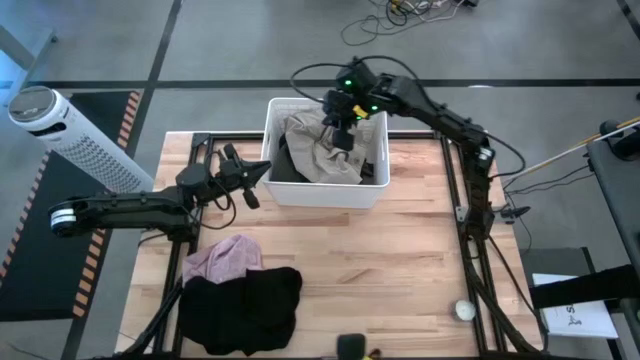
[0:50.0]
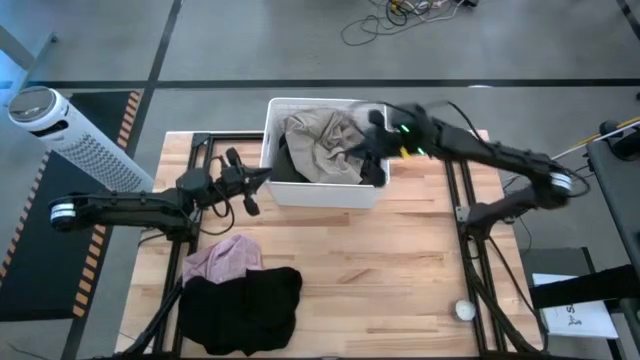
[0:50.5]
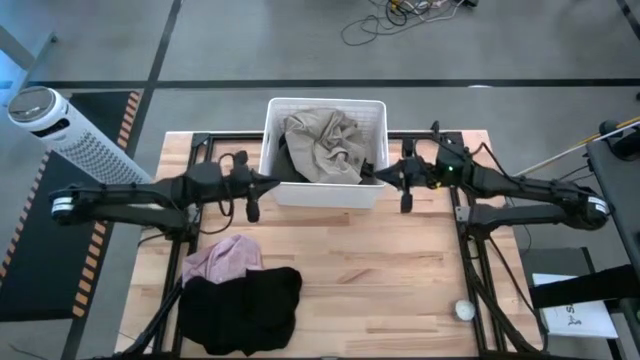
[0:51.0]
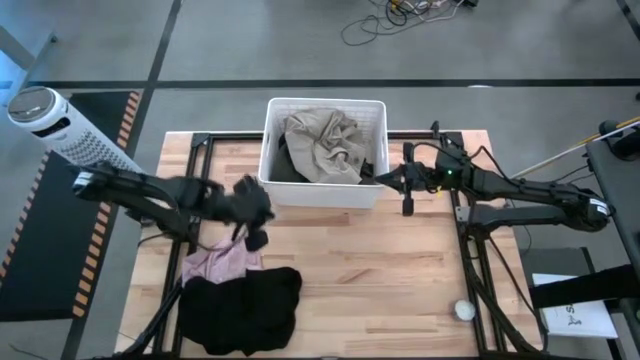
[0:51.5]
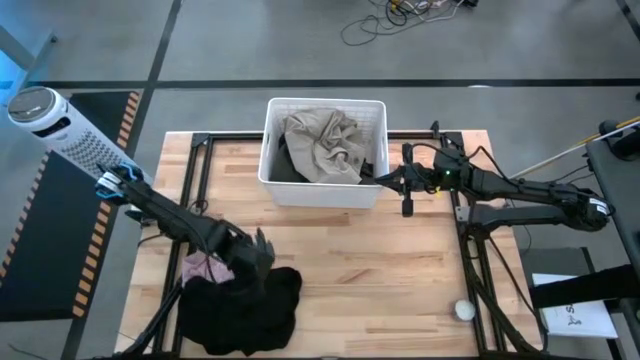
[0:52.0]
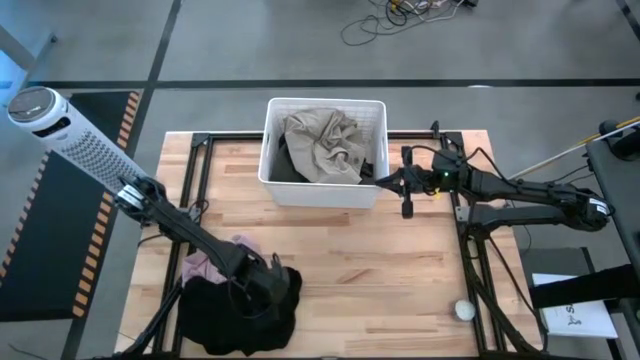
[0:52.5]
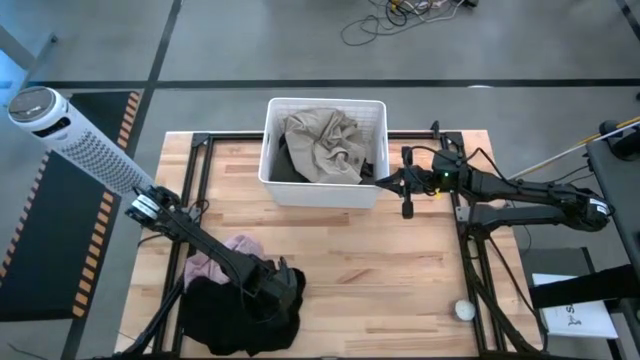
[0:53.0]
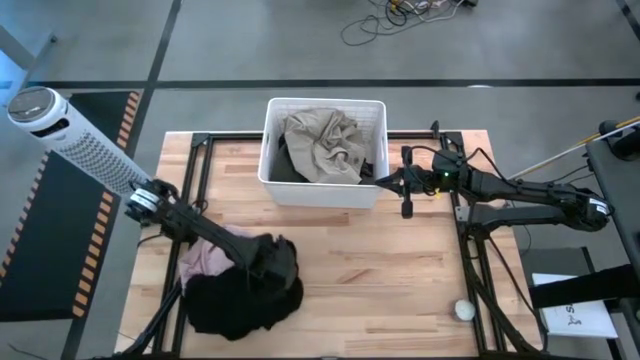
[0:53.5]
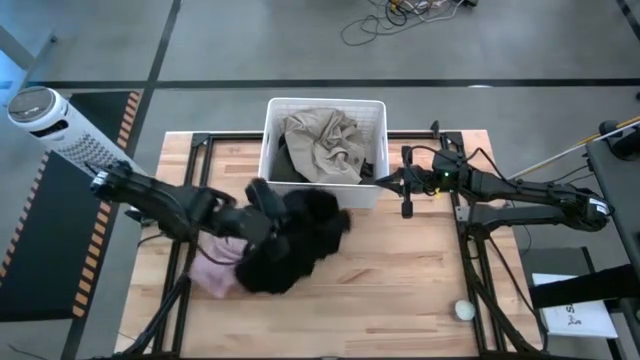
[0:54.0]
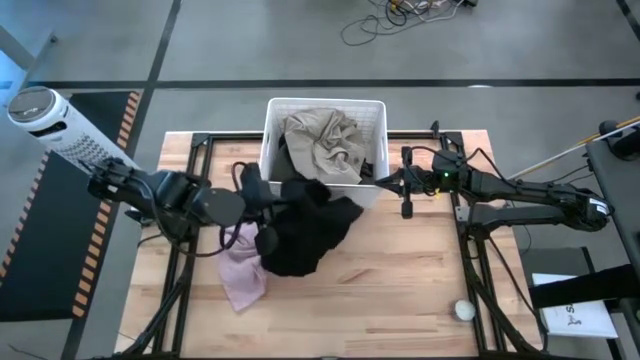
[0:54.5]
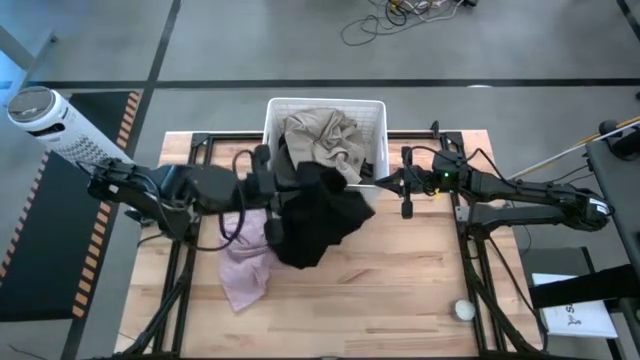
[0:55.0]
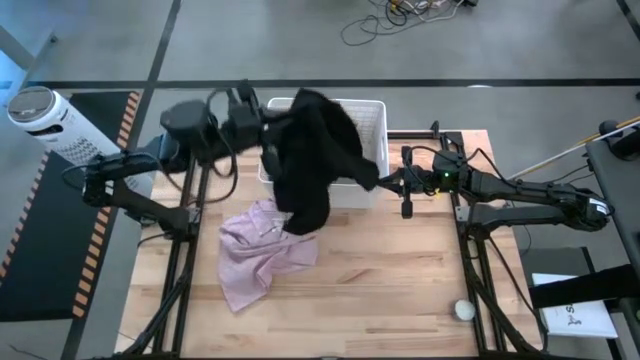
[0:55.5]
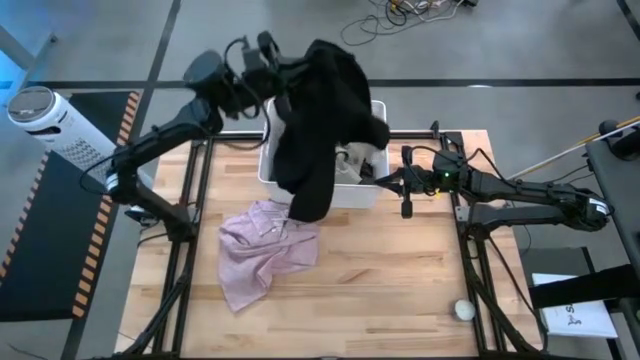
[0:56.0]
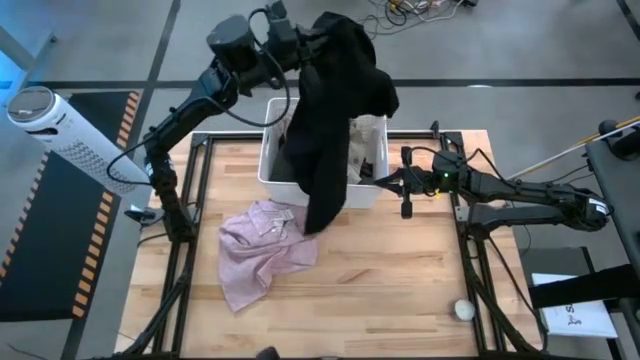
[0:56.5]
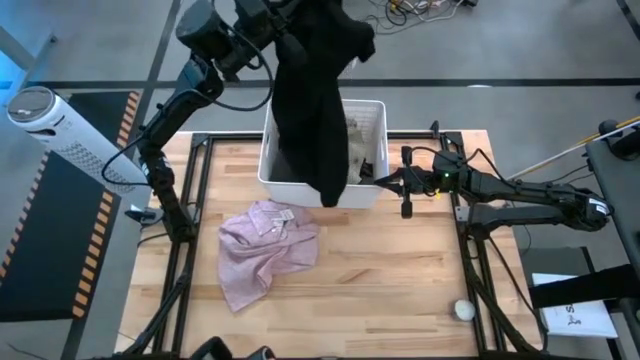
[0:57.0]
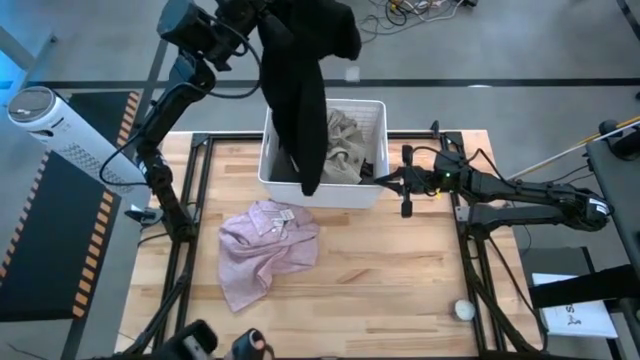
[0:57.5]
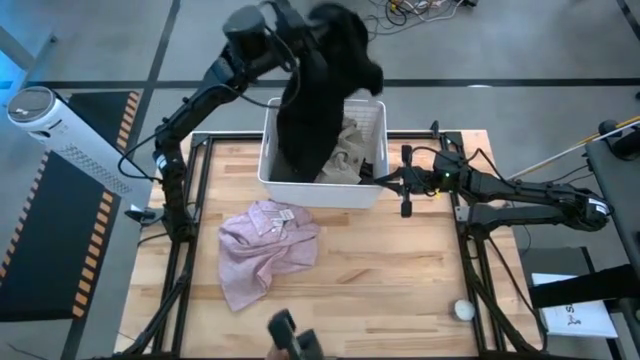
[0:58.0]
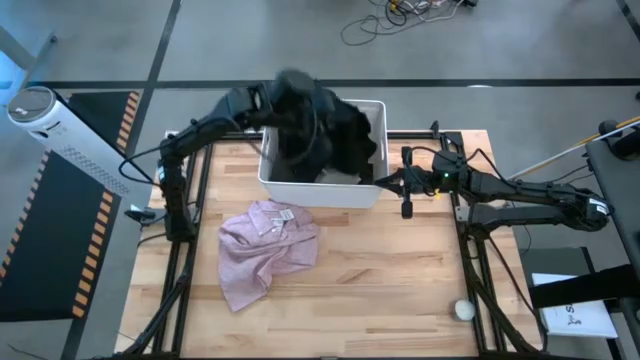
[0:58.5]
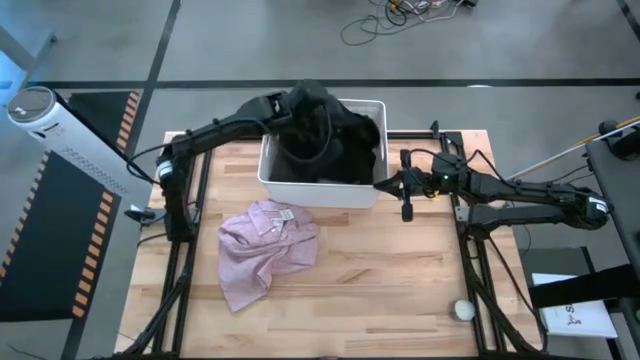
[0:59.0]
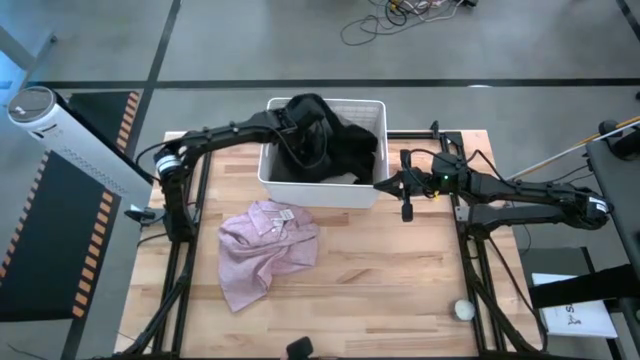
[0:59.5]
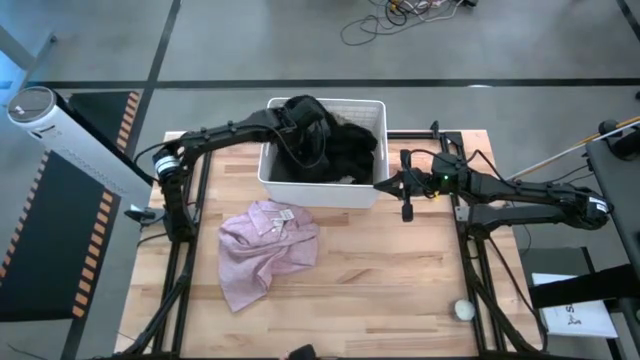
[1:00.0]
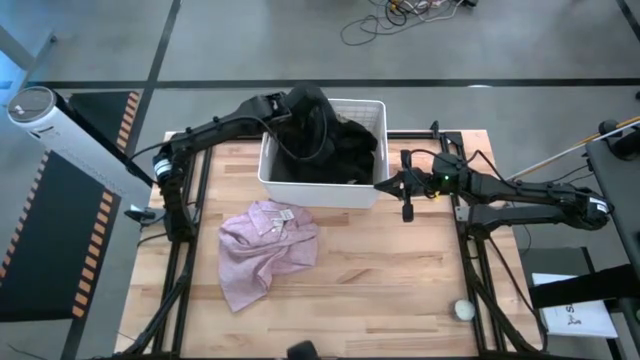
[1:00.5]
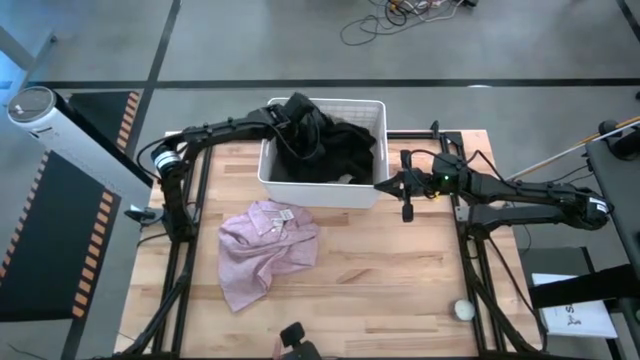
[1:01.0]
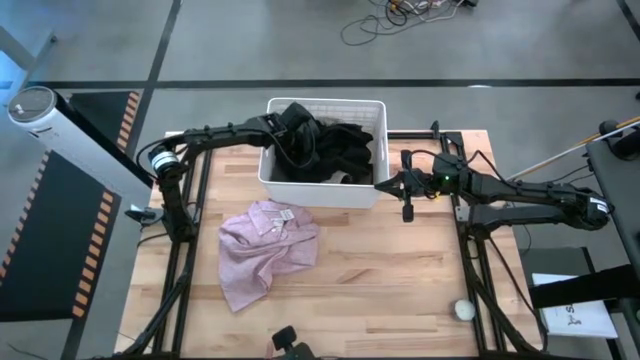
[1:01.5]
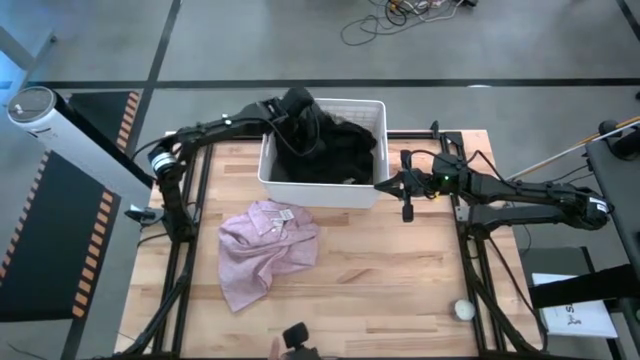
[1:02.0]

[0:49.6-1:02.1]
Task: Sort clothes
Put the black trousers into the laundry bin

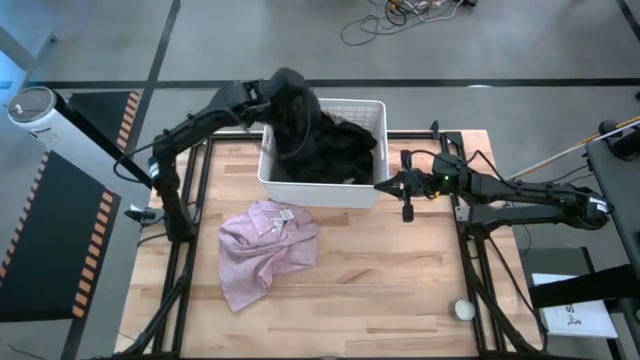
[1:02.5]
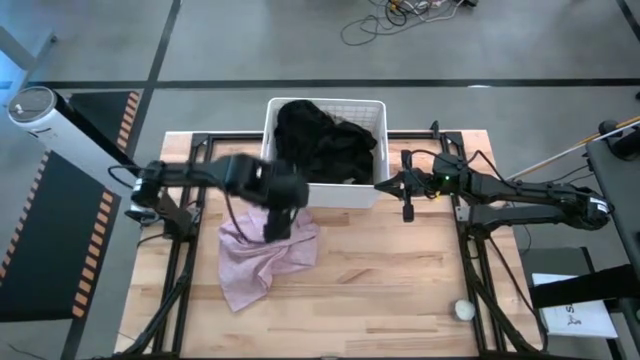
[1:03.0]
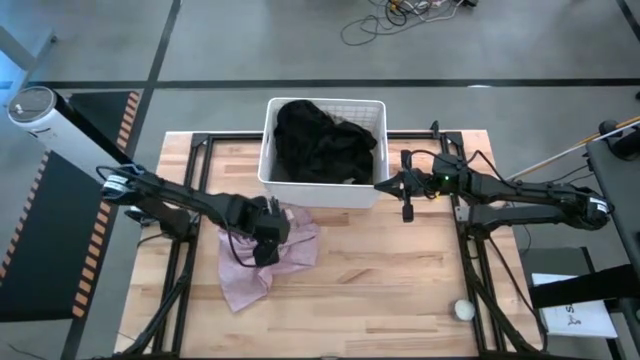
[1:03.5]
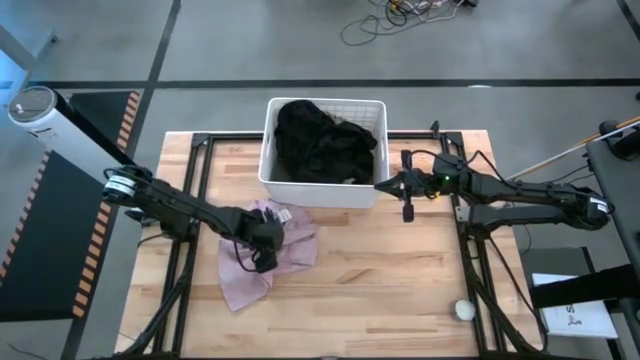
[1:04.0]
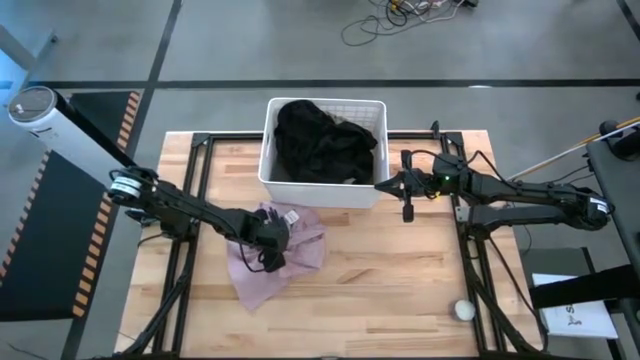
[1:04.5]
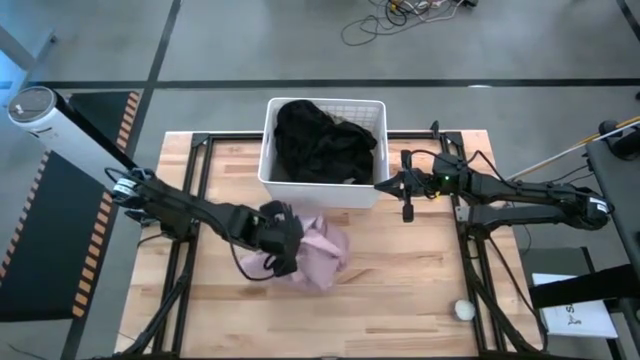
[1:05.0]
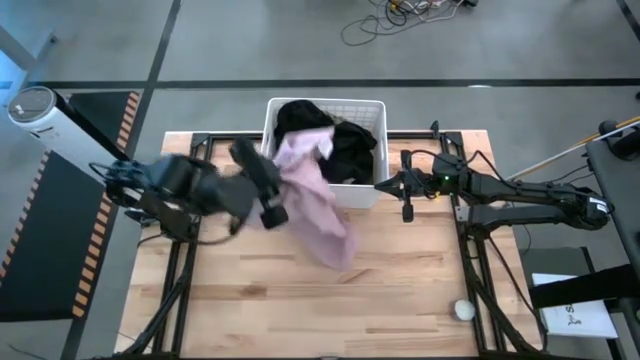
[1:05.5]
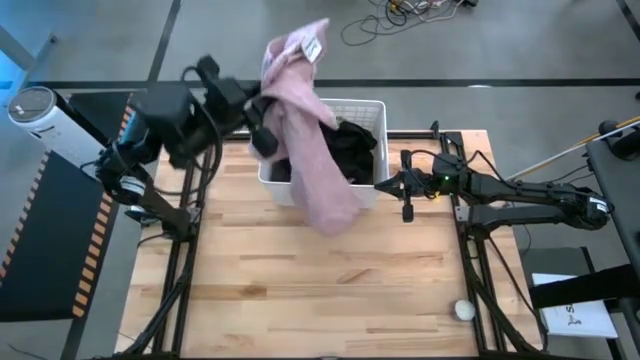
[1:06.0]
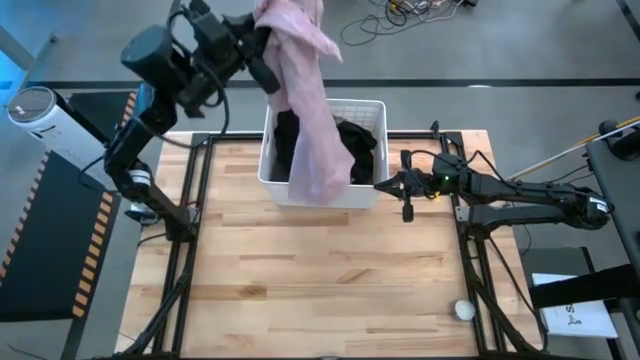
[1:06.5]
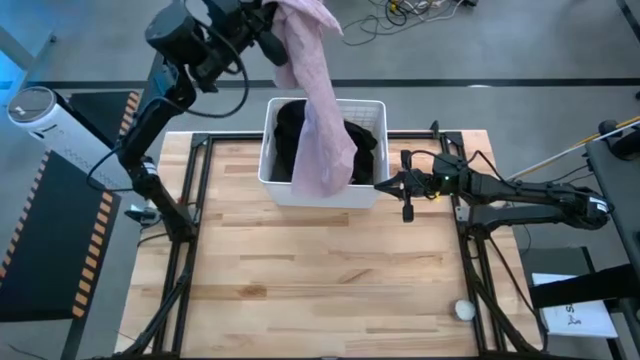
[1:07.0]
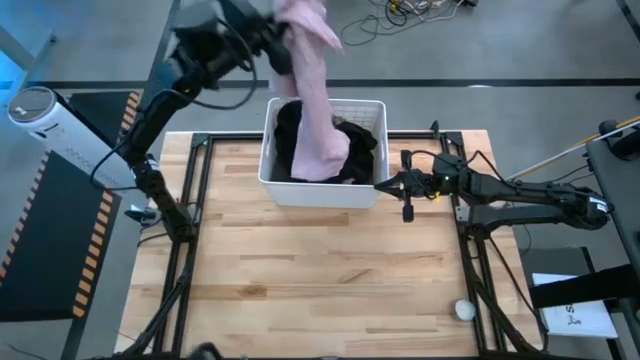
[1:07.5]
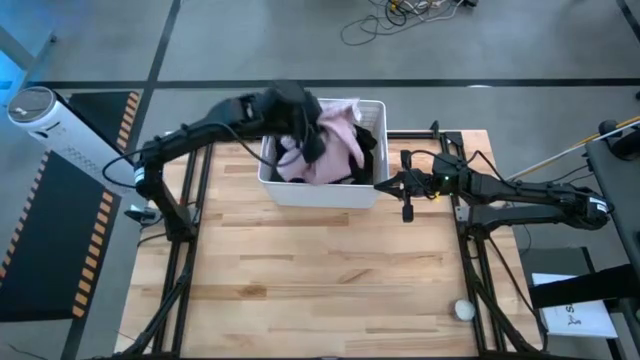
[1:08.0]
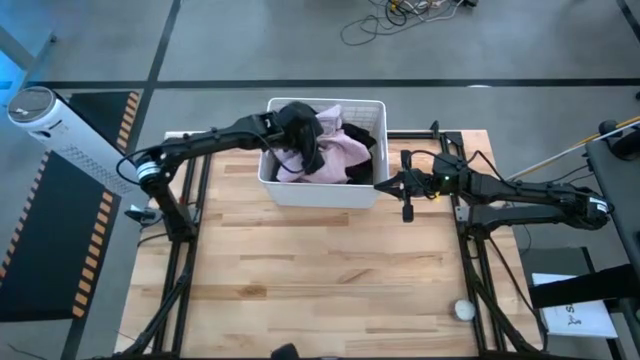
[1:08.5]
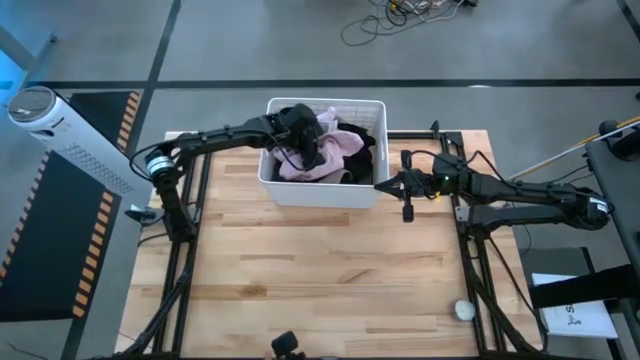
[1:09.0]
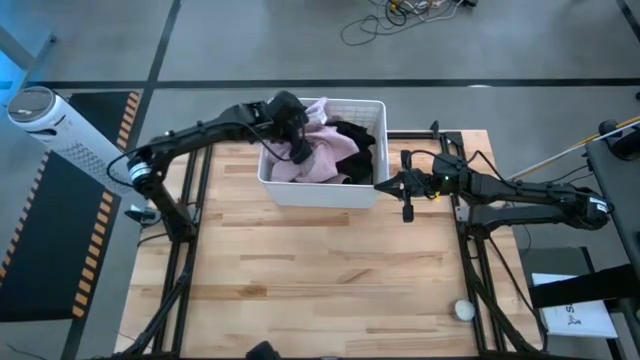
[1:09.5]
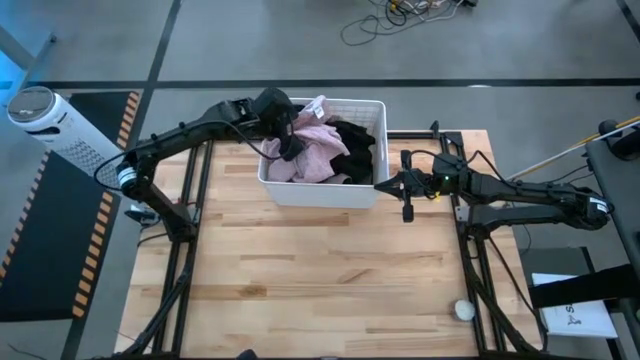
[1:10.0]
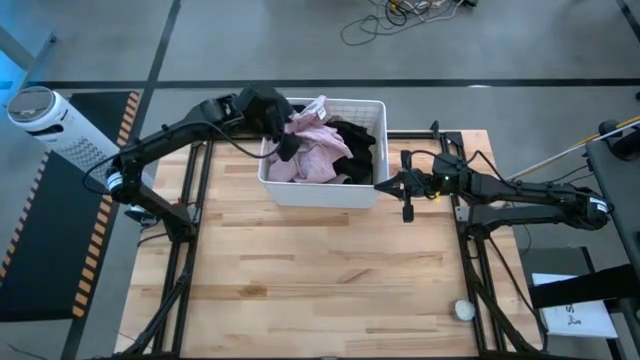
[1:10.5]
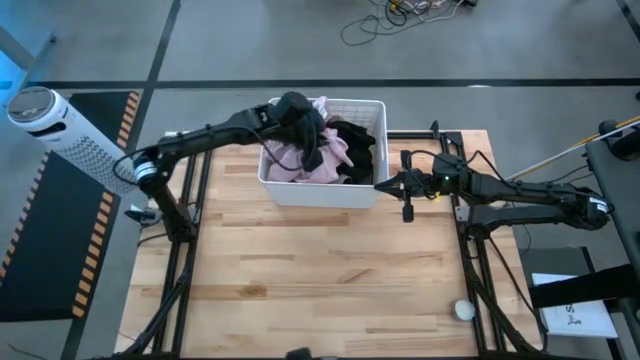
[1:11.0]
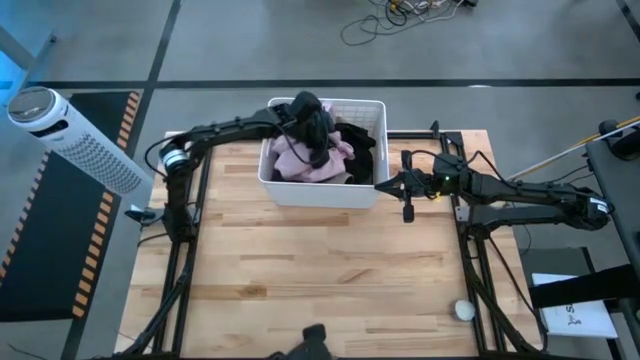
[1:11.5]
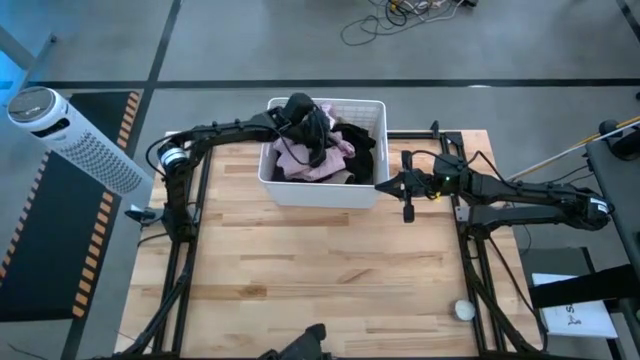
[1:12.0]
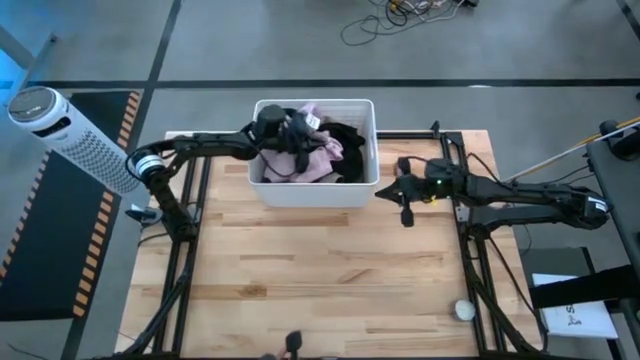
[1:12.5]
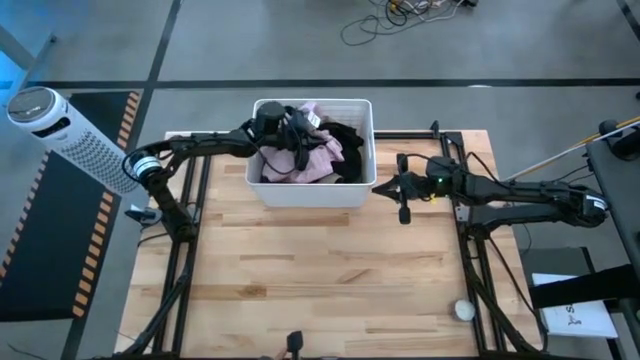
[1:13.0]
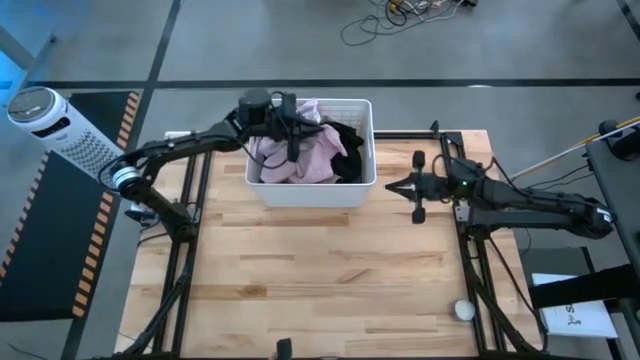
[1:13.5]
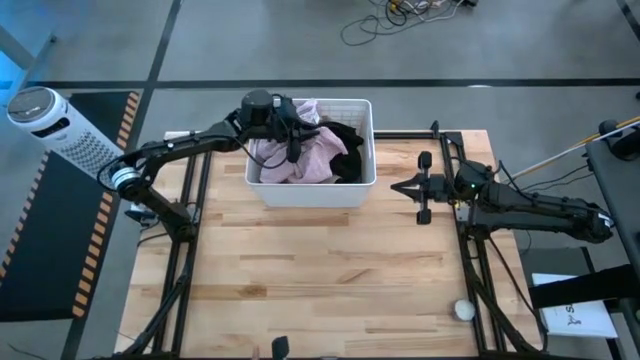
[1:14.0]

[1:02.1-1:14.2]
Put the pink shirt into the laundry bin
